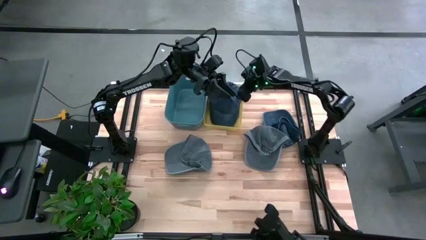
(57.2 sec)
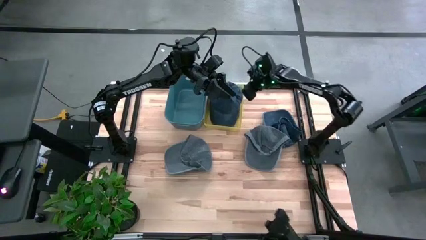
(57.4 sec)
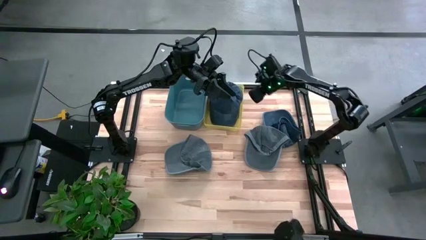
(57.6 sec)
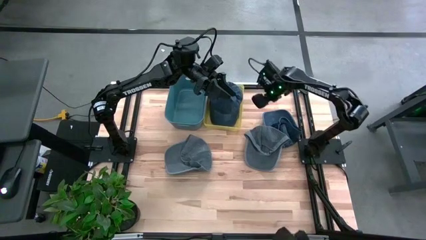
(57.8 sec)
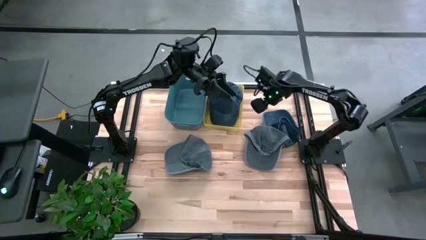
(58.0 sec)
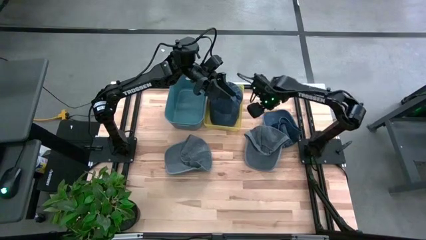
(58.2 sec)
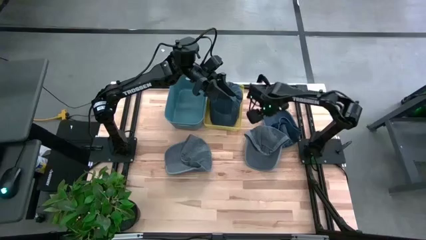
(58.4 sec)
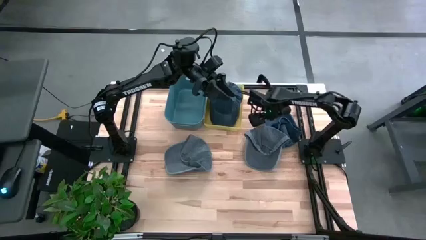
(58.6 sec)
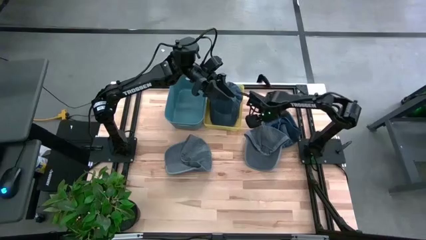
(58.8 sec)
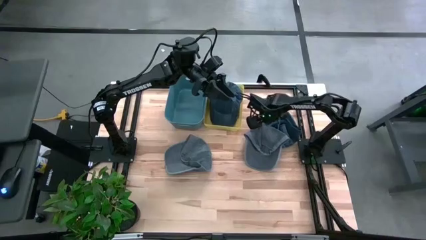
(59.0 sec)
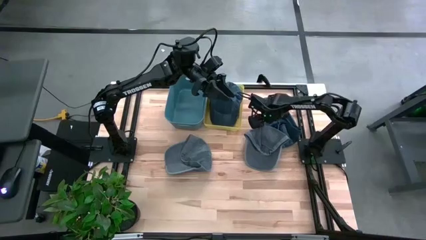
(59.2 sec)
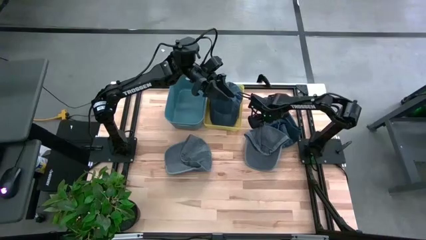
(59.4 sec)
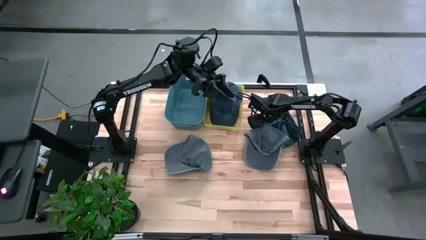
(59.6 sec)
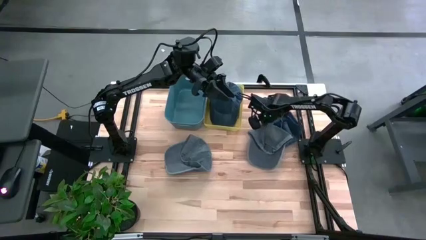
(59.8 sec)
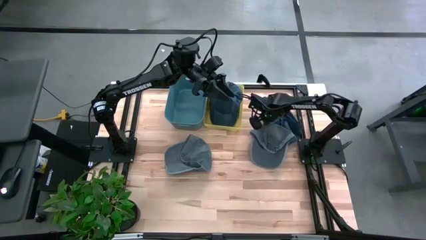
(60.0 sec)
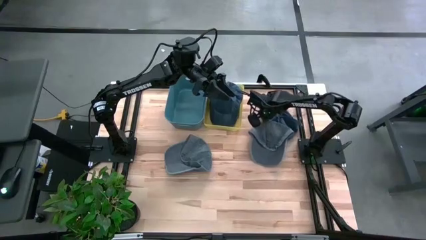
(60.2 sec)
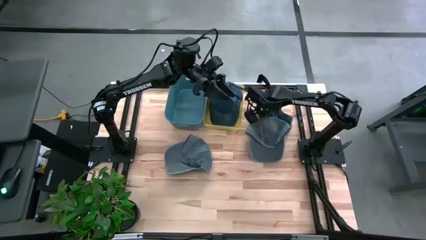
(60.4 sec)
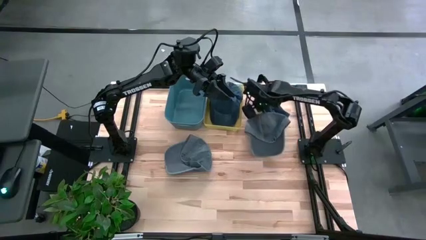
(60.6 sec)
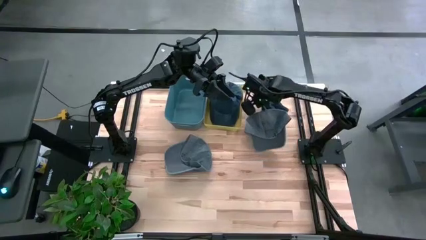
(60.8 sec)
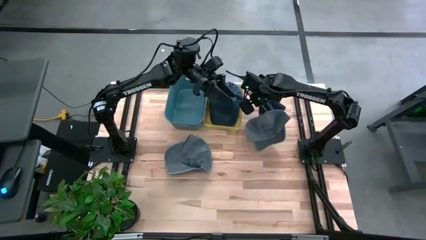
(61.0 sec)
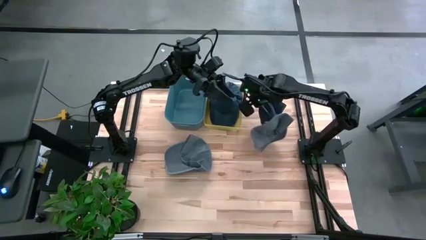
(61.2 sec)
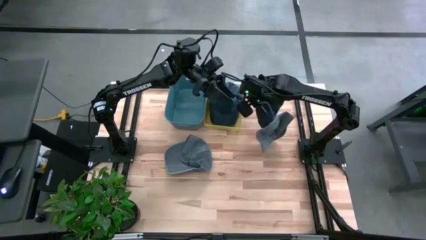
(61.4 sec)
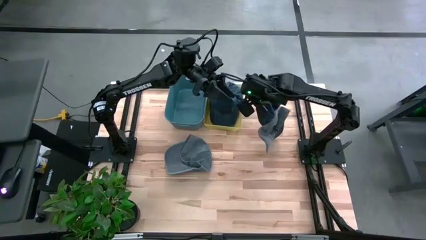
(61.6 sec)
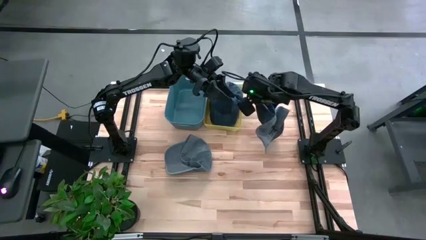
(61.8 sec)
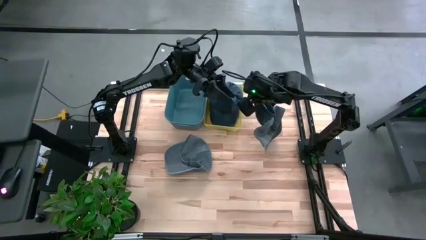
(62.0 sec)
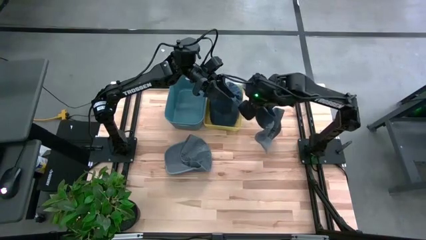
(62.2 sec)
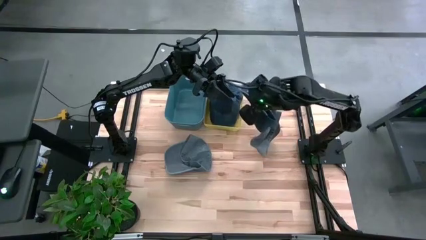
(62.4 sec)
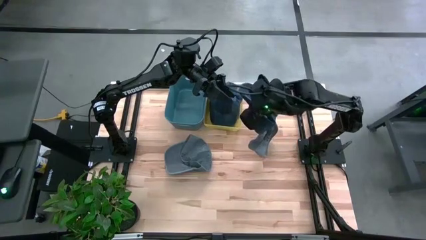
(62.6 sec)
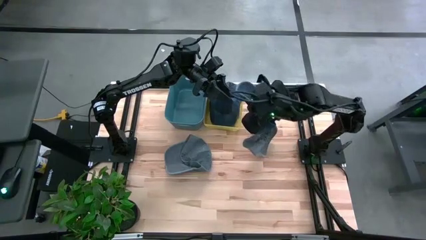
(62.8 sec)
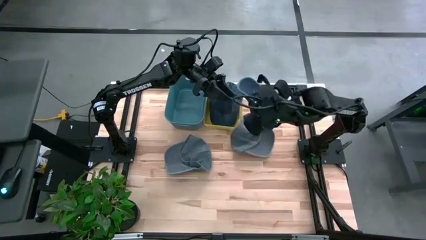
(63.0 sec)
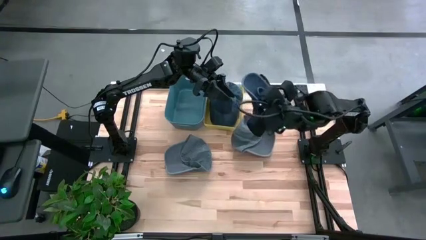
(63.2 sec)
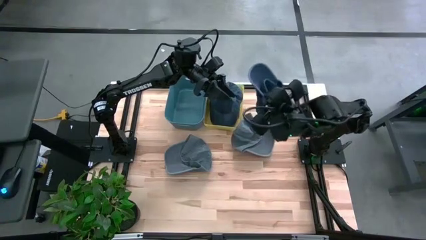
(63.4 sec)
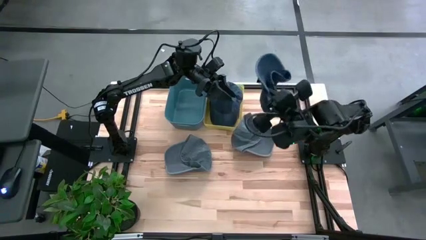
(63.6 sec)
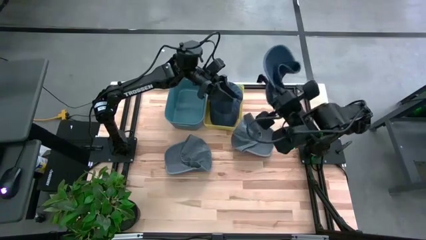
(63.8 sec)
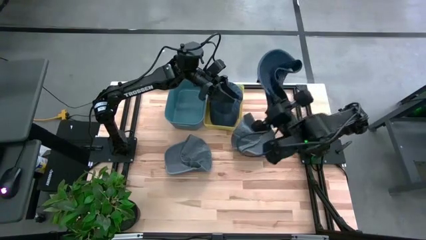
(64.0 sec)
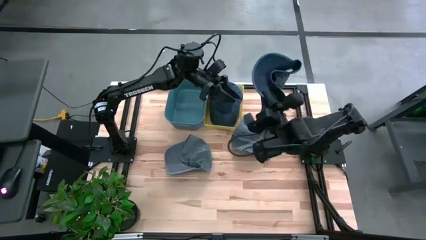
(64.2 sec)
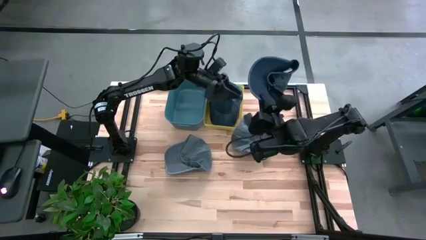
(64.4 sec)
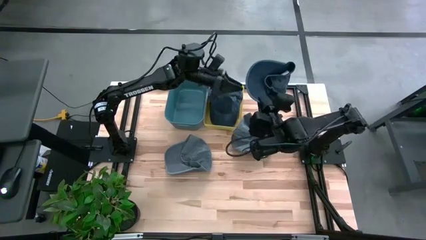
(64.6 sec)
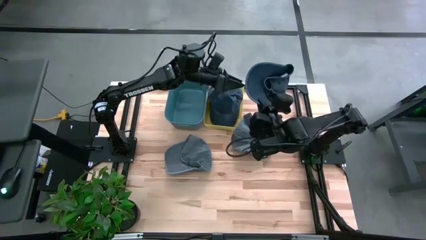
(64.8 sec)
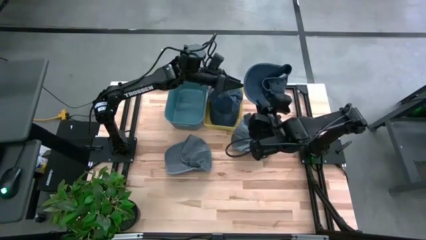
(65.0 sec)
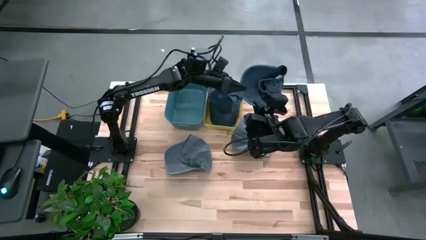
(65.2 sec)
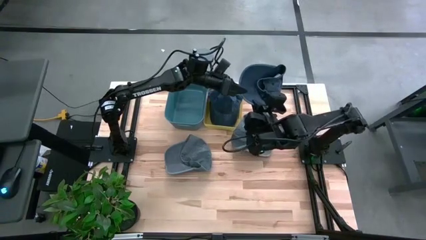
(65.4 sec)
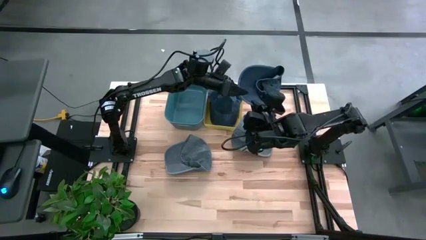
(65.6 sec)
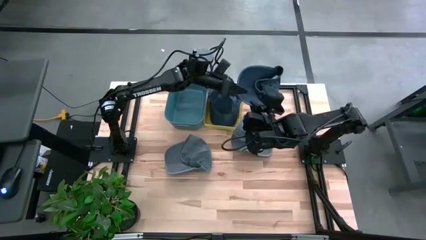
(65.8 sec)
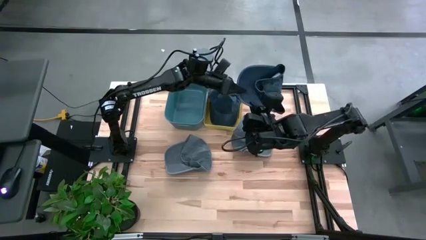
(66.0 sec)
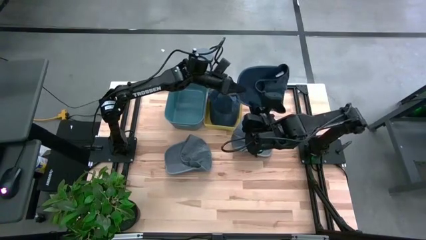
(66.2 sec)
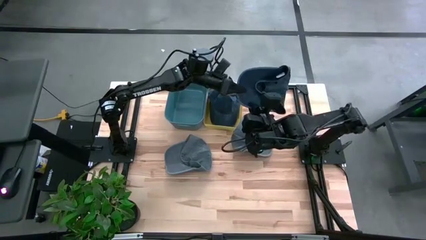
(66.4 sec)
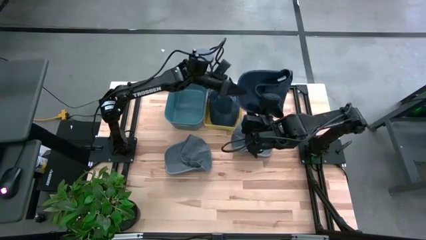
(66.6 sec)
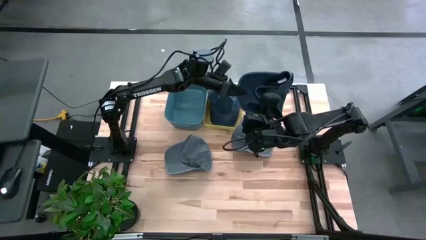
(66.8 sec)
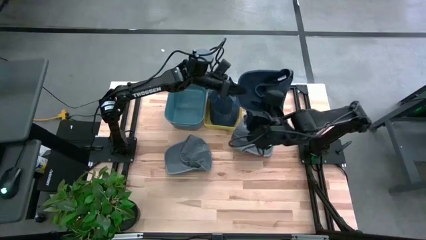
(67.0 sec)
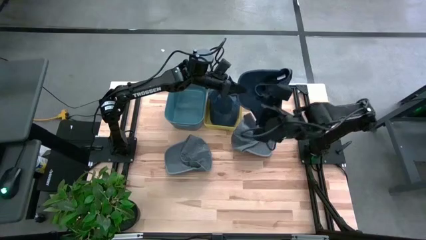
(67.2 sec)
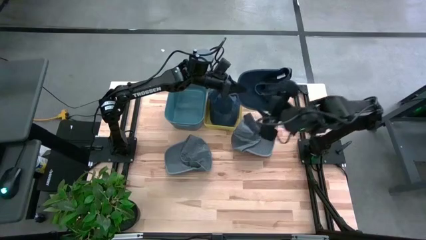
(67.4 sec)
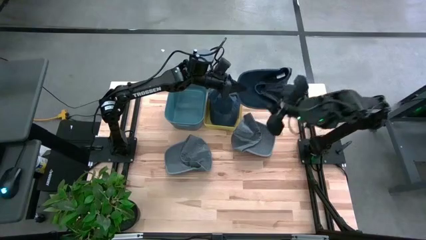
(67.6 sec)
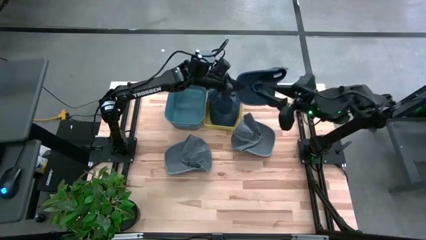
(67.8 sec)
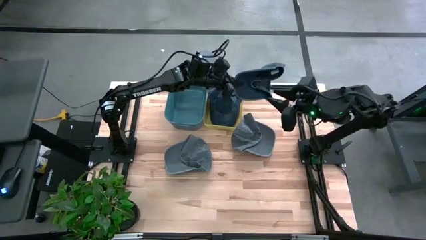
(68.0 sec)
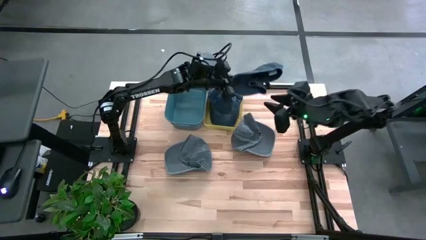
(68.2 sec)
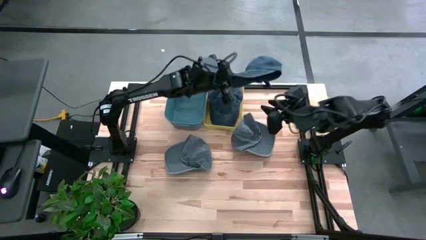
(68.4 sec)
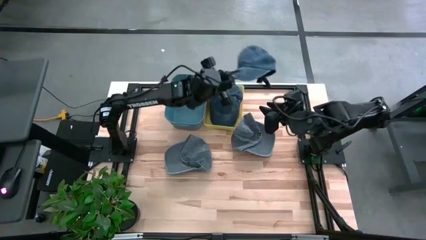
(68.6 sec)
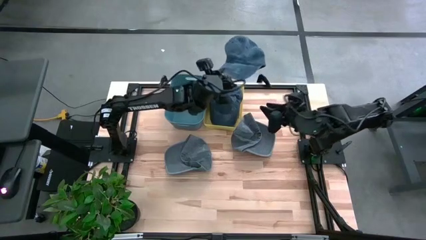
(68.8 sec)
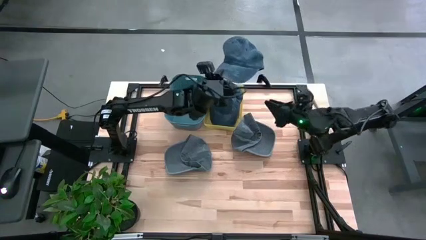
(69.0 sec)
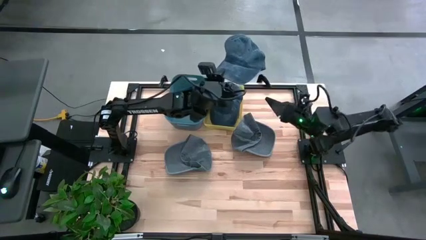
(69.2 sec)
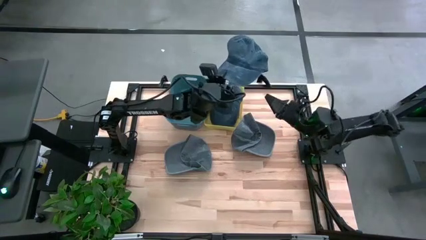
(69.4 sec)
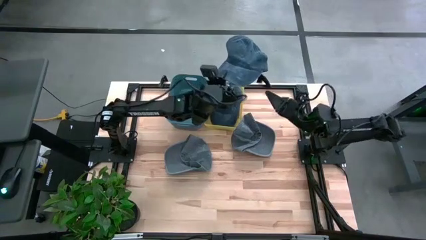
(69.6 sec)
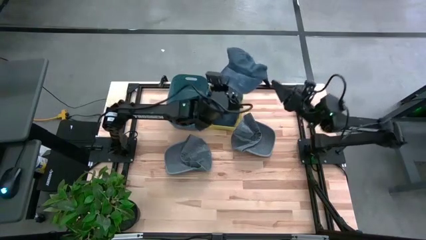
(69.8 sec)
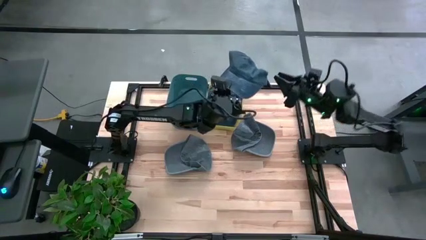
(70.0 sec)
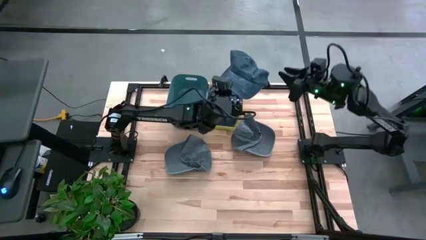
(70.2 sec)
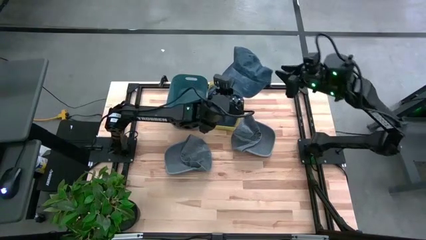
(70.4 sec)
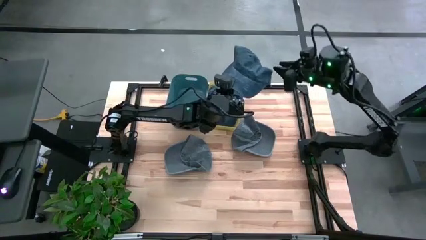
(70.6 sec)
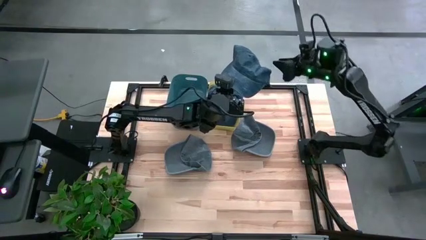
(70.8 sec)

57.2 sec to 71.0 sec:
Task: Pick & Place hat
Put the blue cap into the yellow bin
